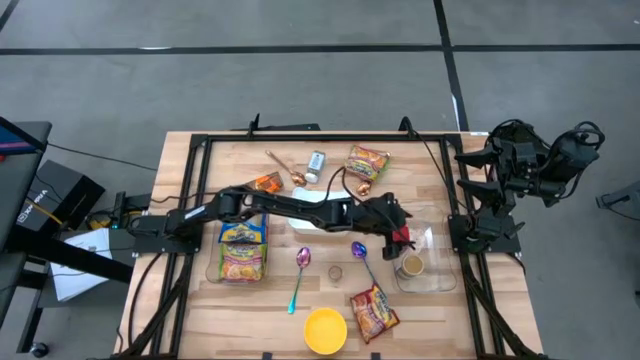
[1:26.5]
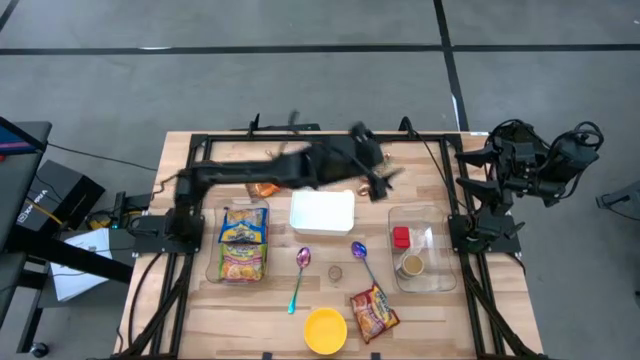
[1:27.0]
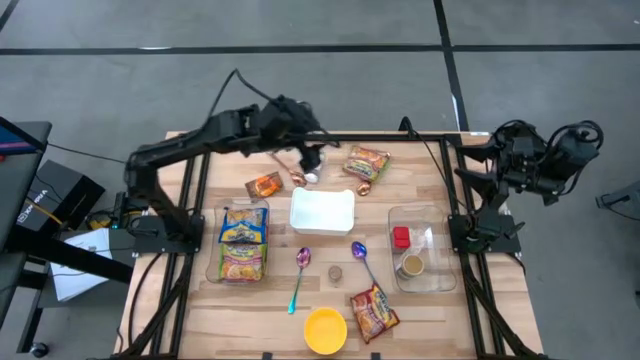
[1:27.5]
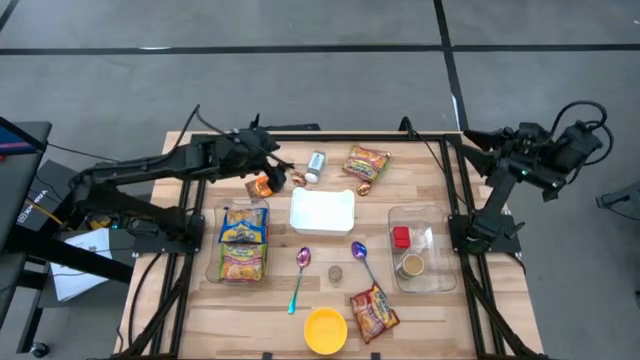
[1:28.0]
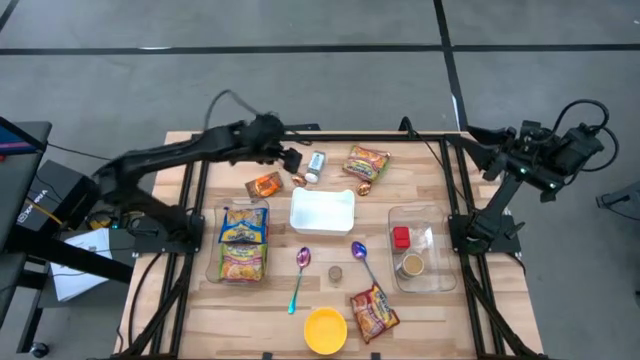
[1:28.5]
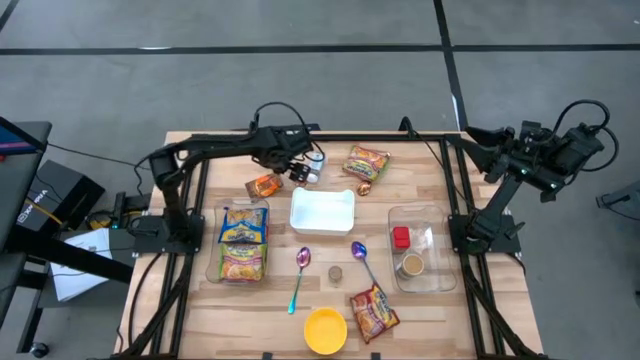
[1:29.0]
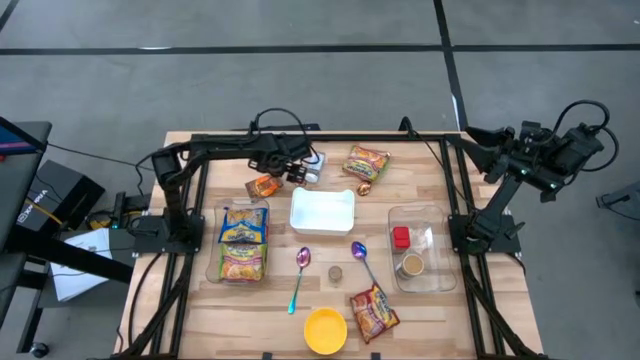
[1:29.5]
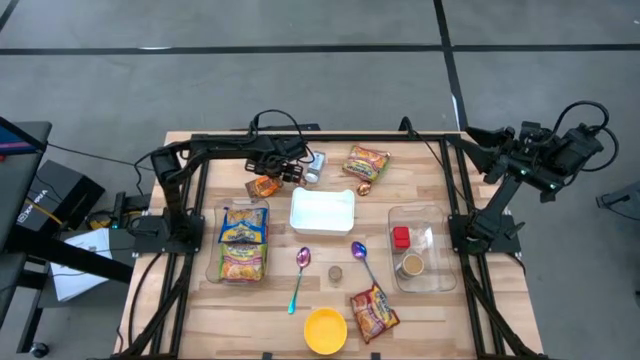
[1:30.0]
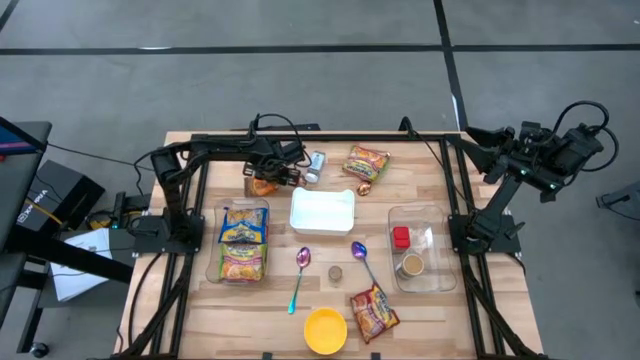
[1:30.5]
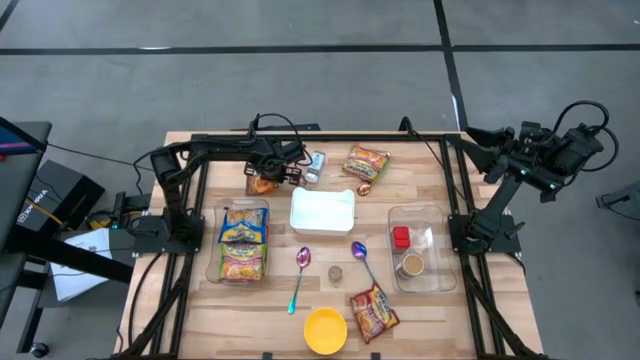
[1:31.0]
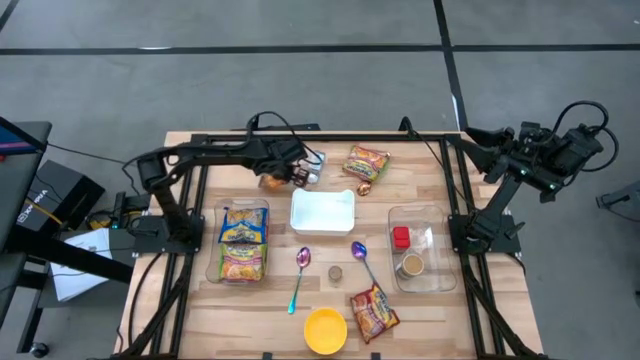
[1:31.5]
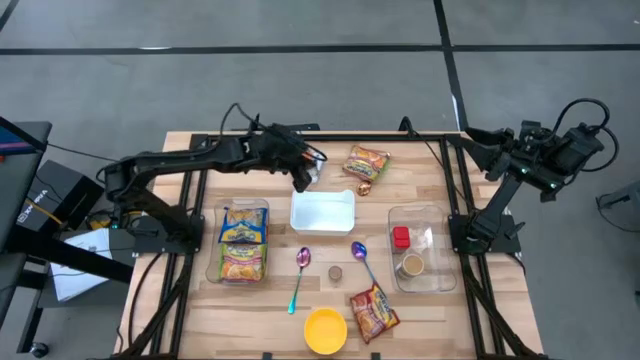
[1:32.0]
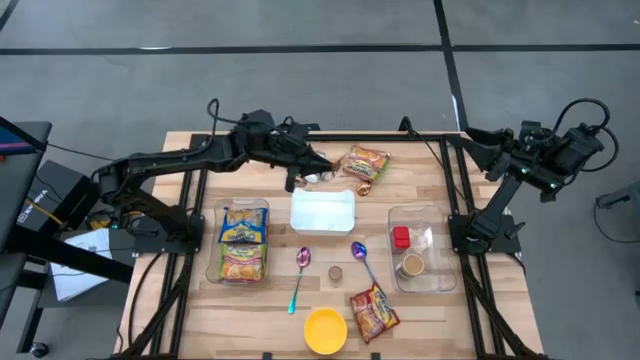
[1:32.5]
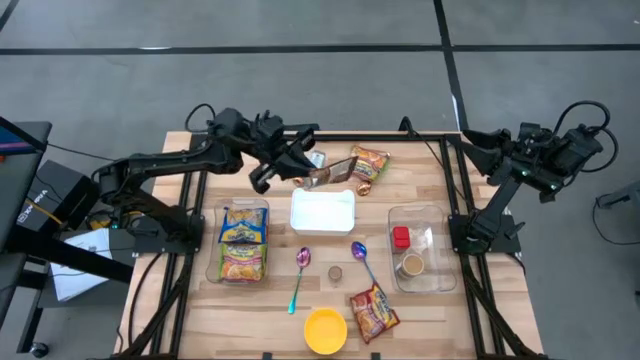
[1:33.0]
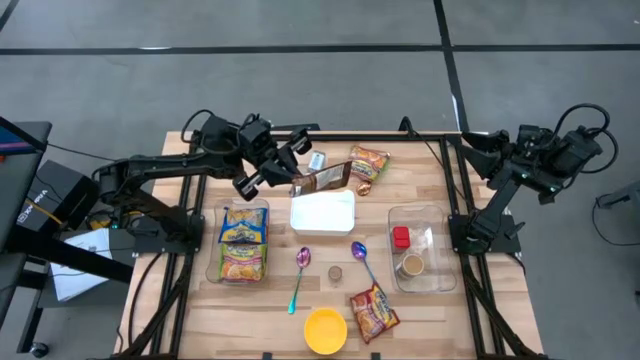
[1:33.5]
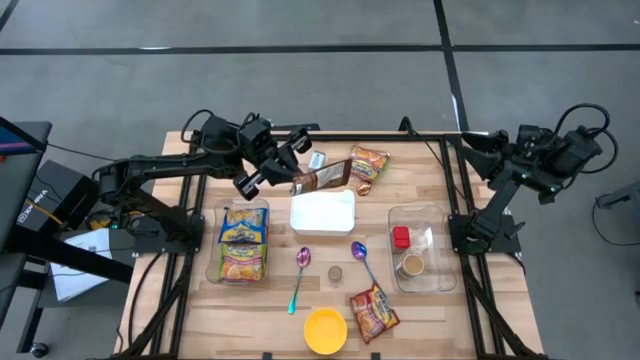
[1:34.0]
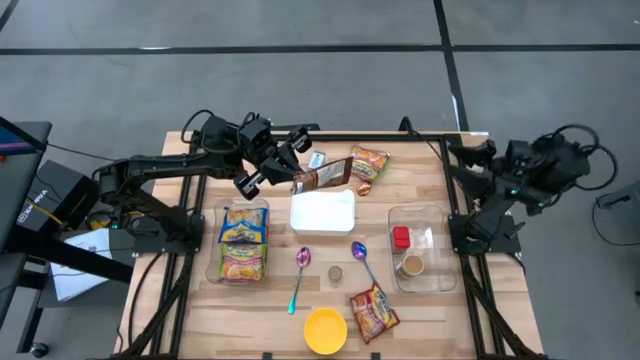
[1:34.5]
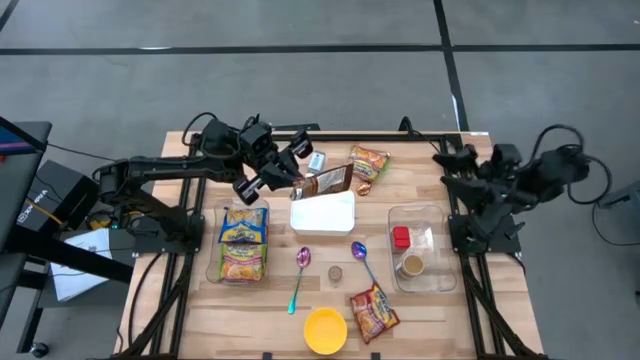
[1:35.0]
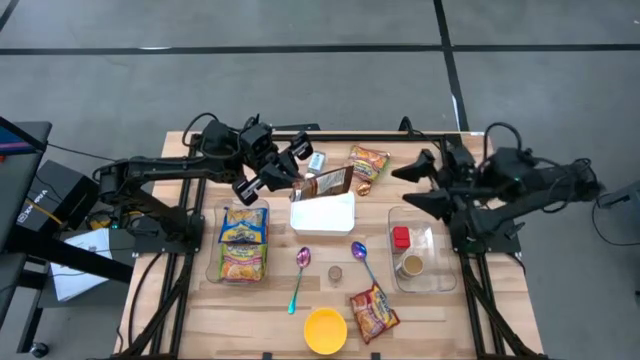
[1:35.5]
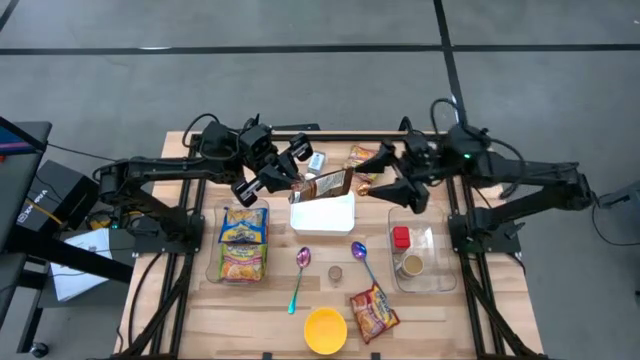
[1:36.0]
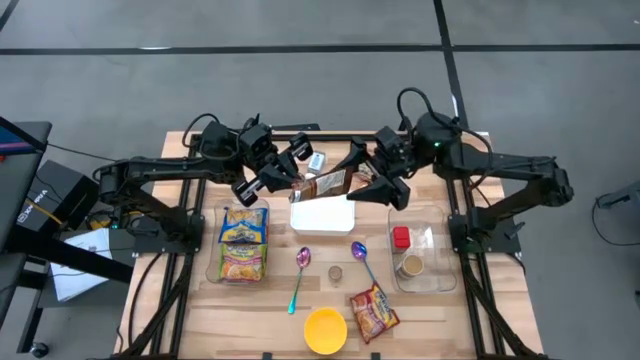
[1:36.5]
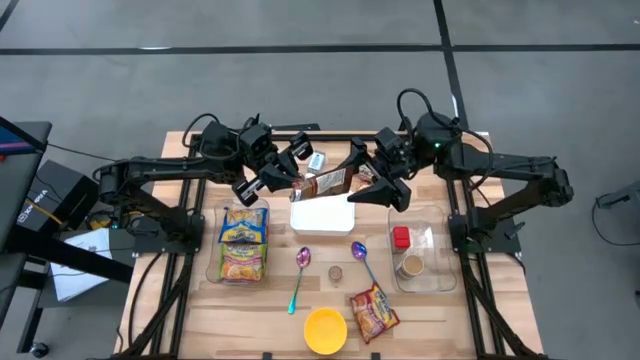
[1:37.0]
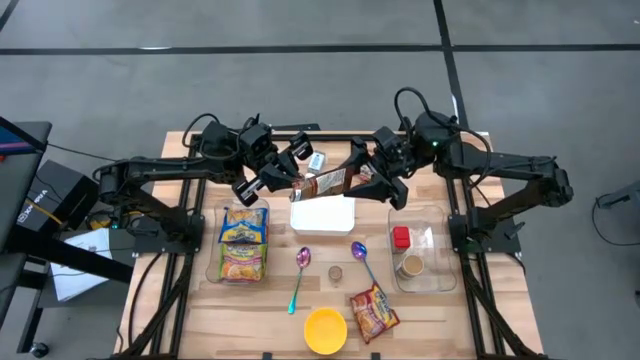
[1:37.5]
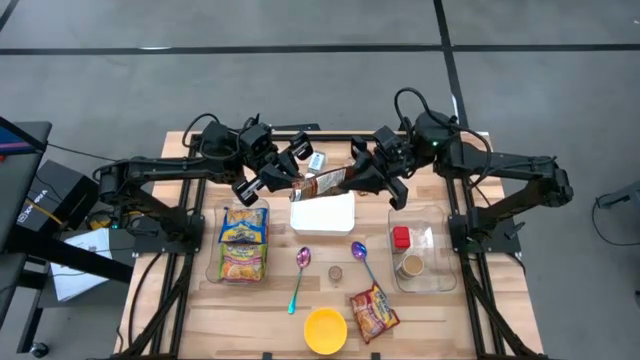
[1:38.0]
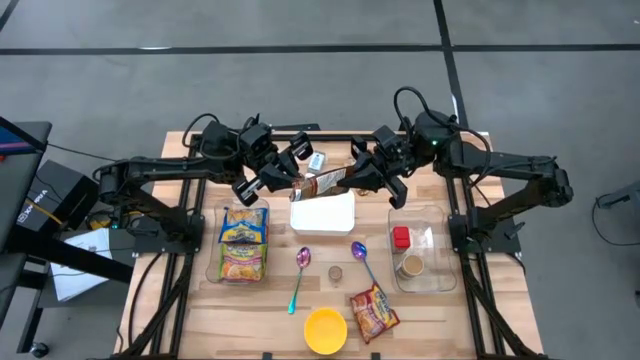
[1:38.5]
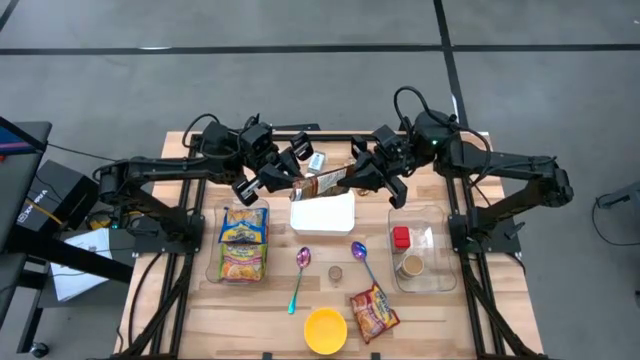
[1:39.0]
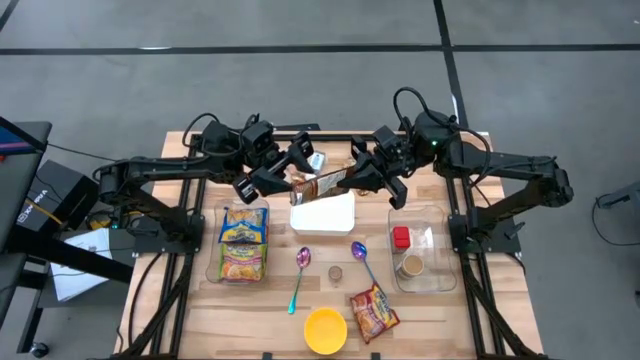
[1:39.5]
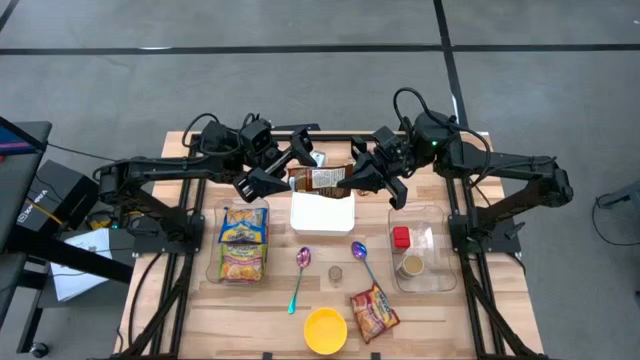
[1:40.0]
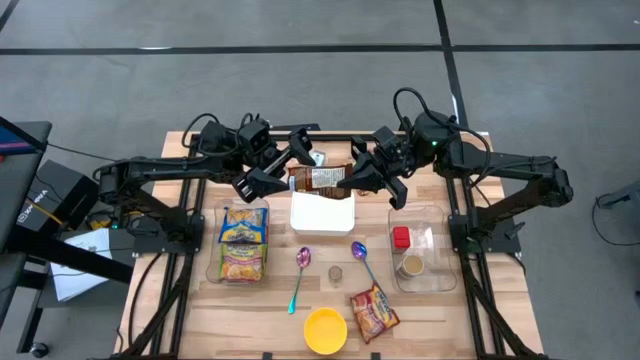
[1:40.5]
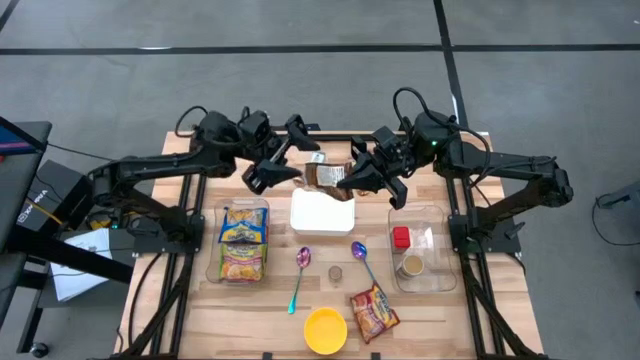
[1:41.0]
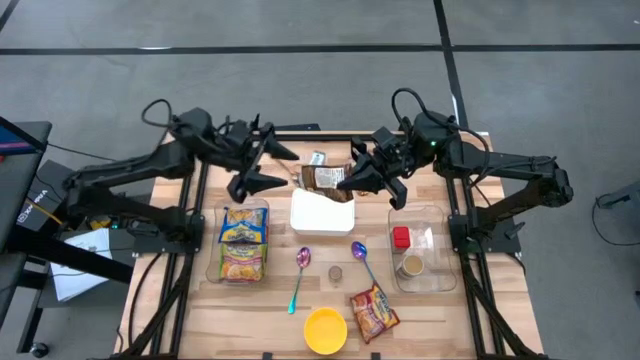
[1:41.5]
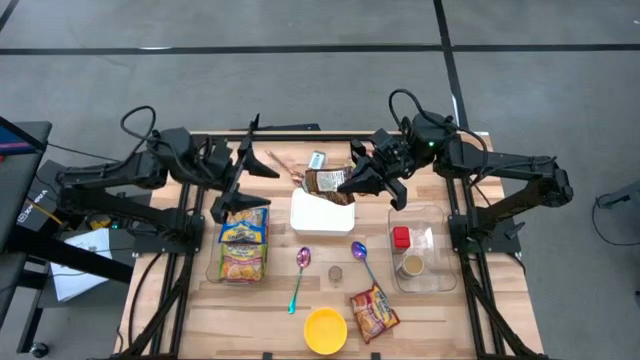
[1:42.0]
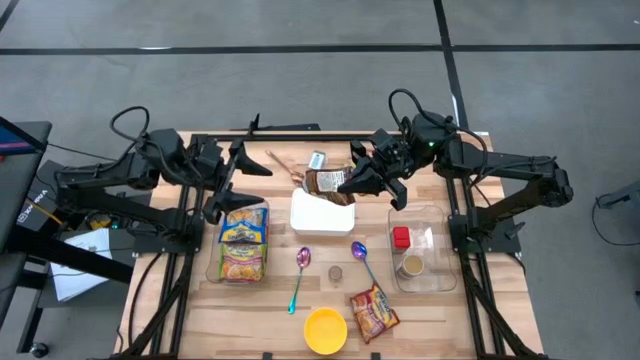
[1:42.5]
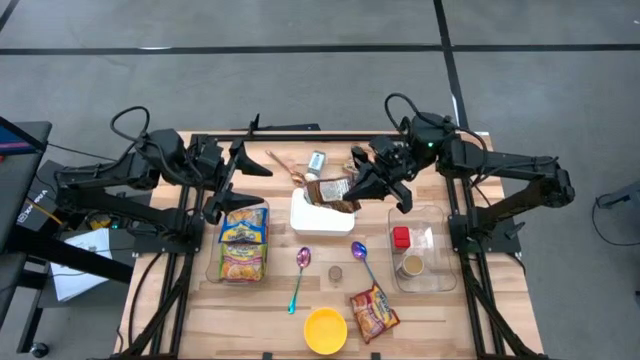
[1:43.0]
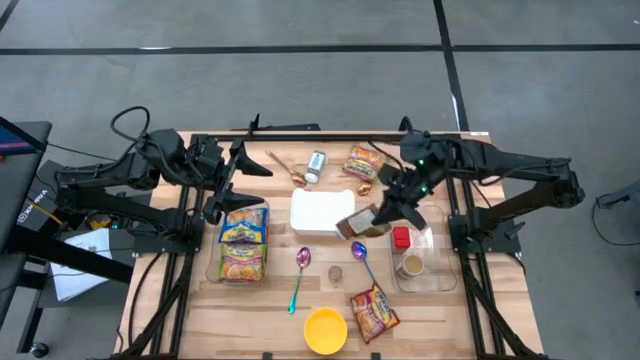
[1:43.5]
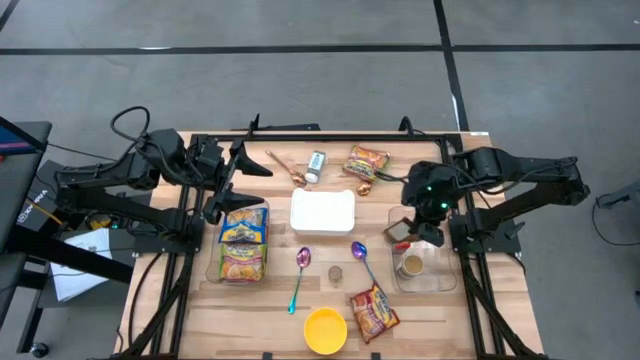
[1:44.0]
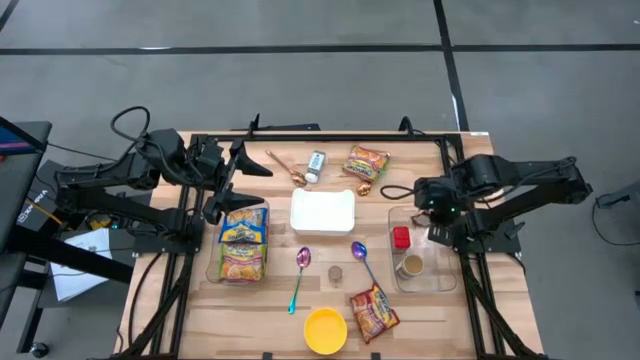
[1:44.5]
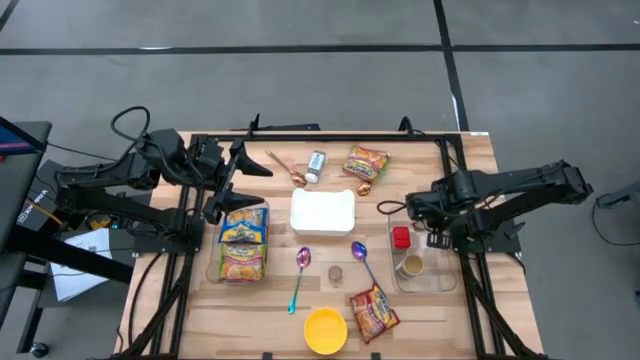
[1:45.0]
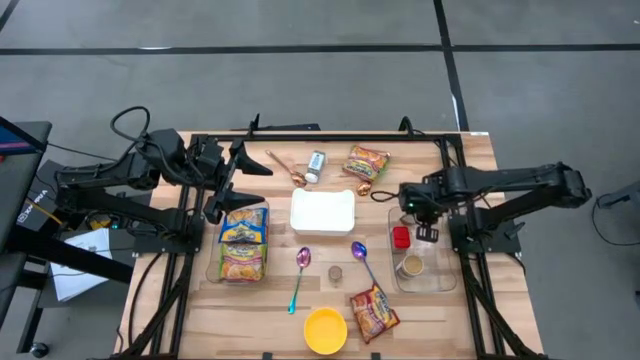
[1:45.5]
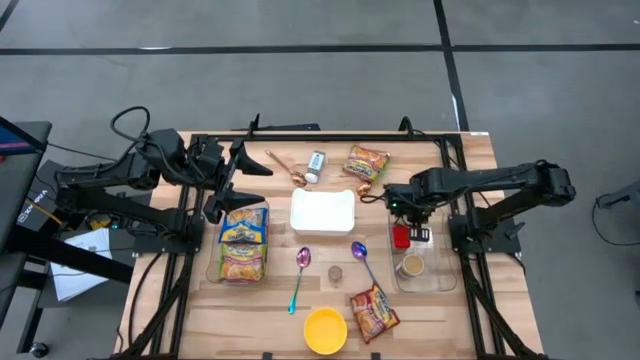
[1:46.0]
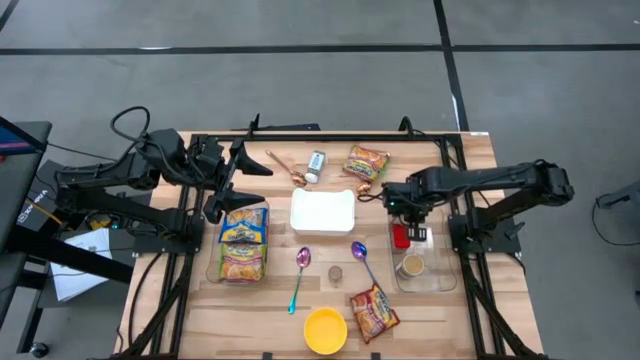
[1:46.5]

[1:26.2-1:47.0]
Task: Pick & Place Food Item
Put the orange seasoning bag into the right transparent bin

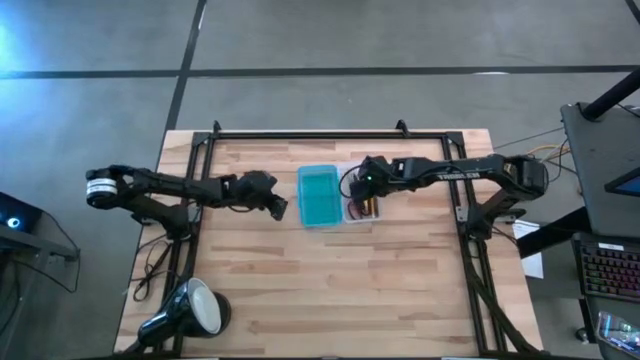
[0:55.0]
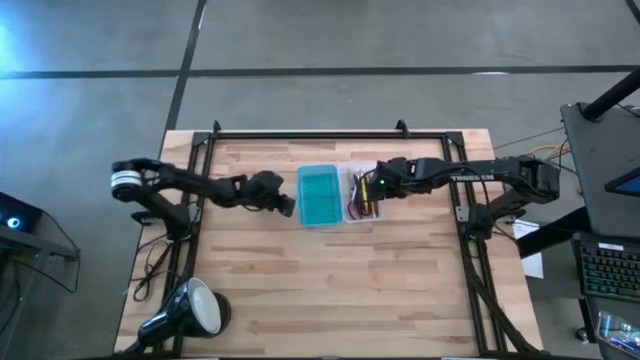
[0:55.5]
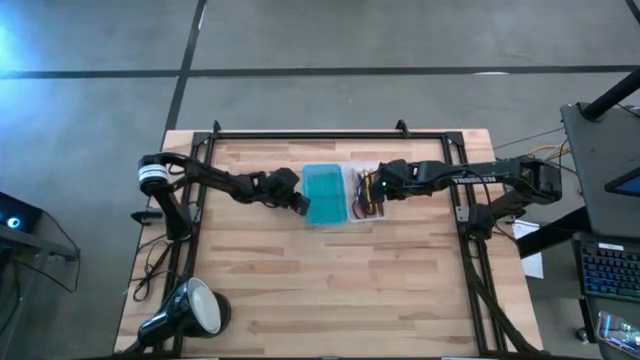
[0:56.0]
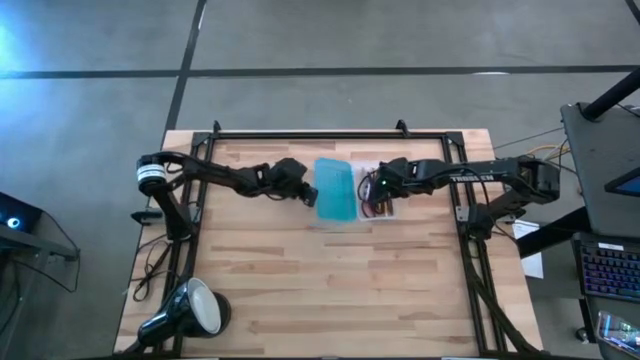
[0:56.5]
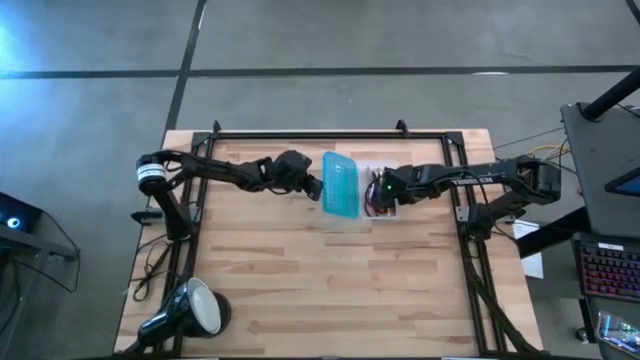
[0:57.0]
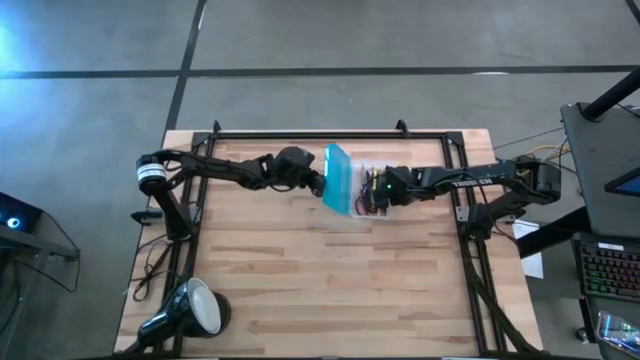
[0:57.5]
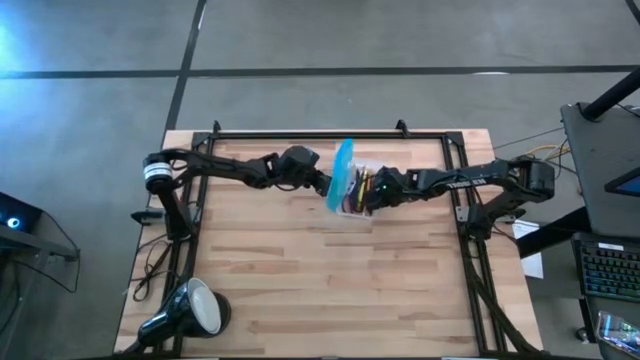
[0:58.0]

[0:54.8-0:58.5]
Task: Pick & place school supplies into a supply box
Close the blue supply box
